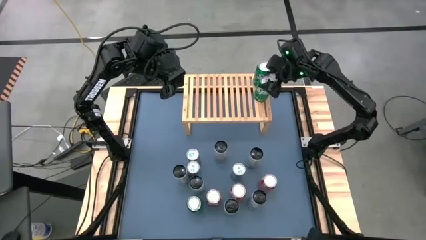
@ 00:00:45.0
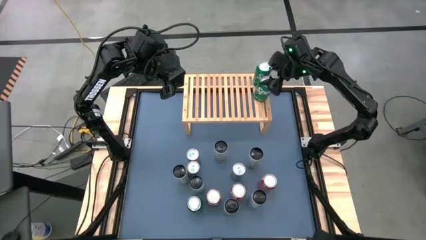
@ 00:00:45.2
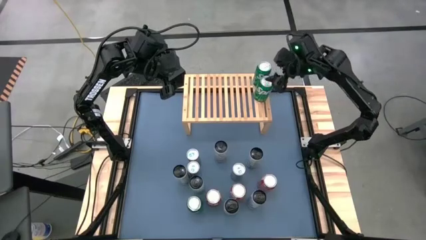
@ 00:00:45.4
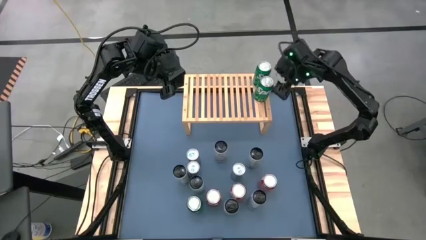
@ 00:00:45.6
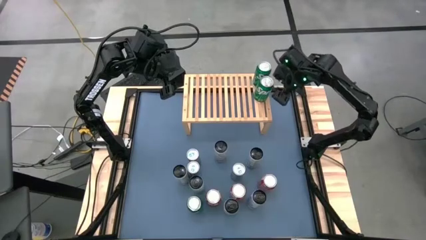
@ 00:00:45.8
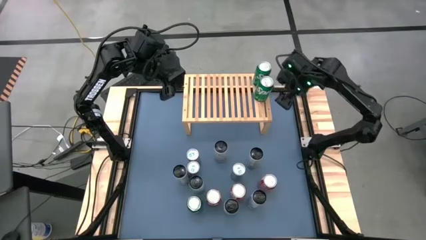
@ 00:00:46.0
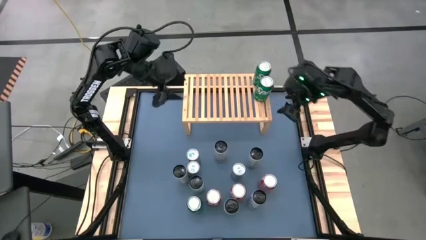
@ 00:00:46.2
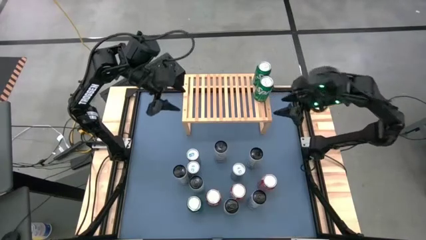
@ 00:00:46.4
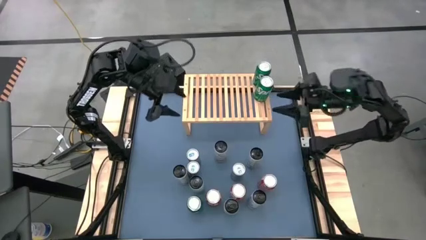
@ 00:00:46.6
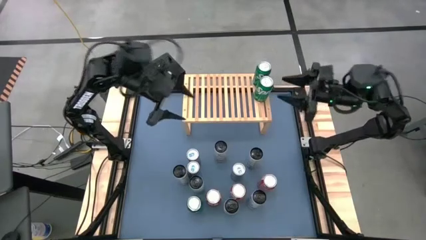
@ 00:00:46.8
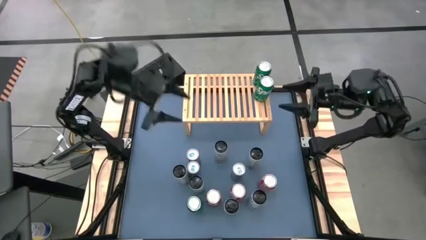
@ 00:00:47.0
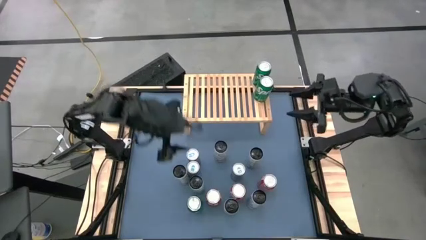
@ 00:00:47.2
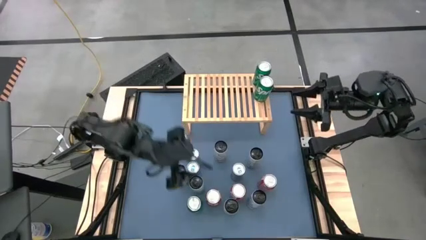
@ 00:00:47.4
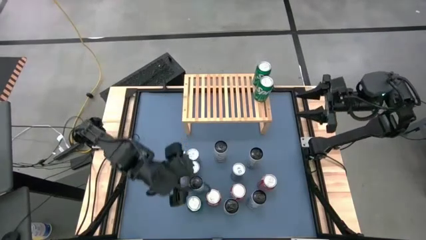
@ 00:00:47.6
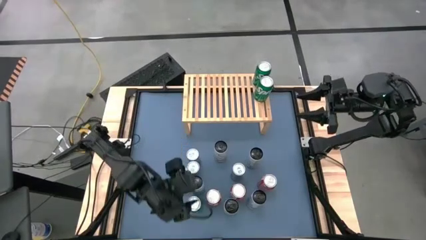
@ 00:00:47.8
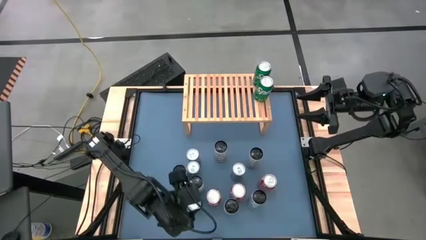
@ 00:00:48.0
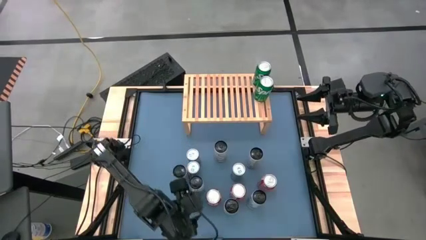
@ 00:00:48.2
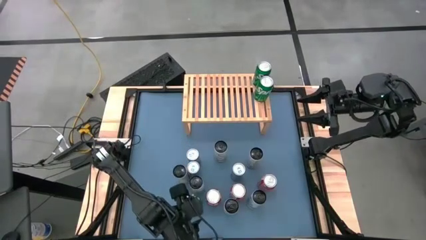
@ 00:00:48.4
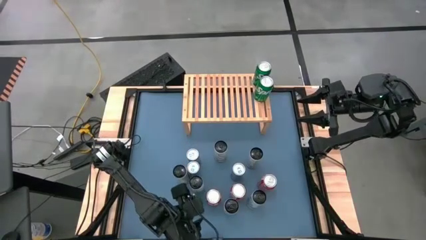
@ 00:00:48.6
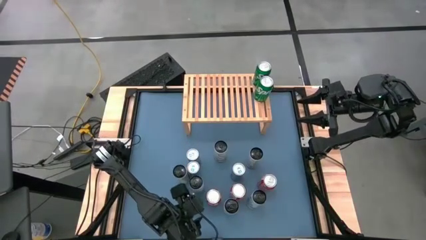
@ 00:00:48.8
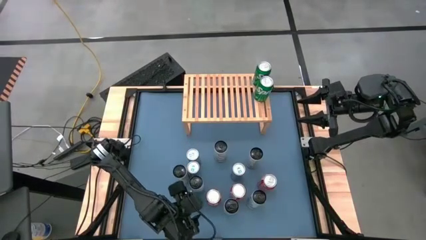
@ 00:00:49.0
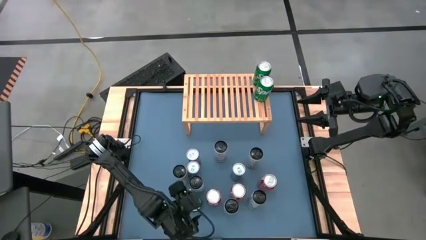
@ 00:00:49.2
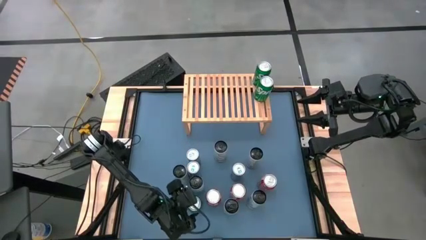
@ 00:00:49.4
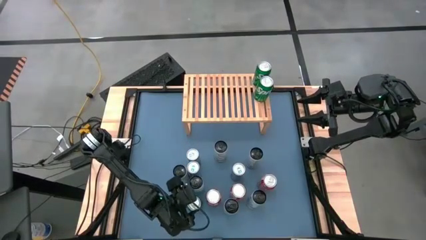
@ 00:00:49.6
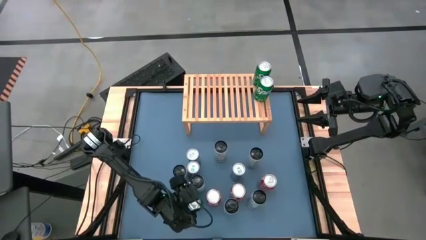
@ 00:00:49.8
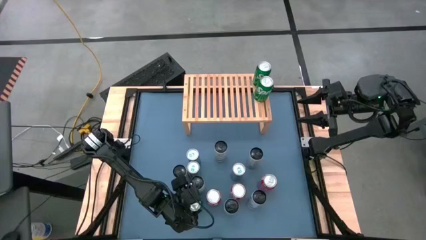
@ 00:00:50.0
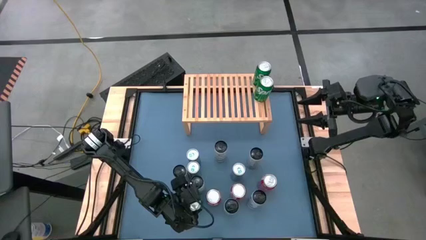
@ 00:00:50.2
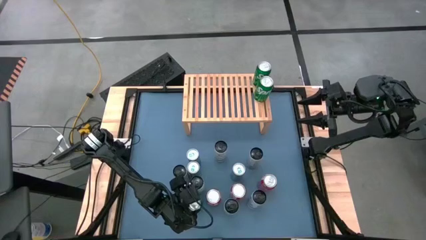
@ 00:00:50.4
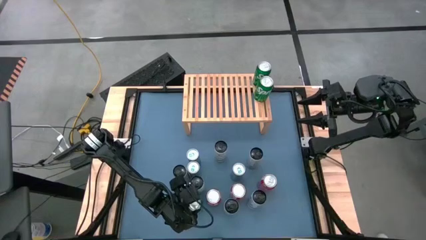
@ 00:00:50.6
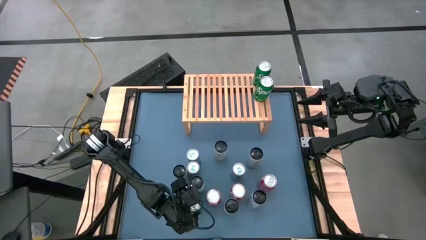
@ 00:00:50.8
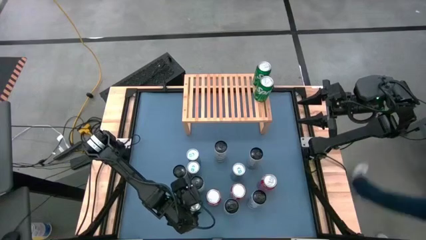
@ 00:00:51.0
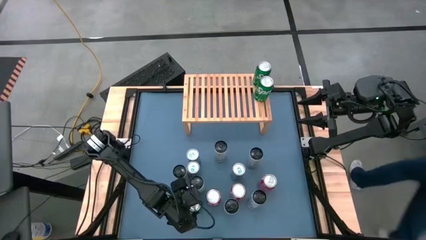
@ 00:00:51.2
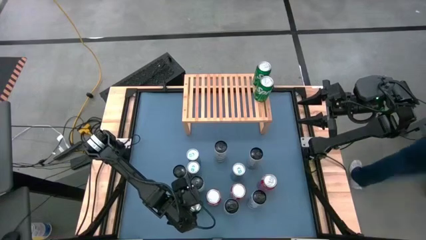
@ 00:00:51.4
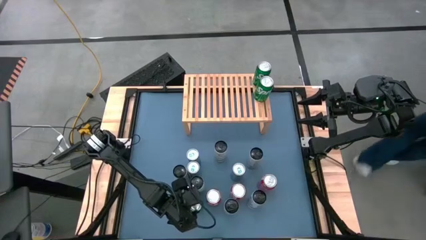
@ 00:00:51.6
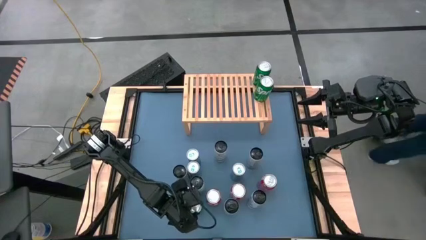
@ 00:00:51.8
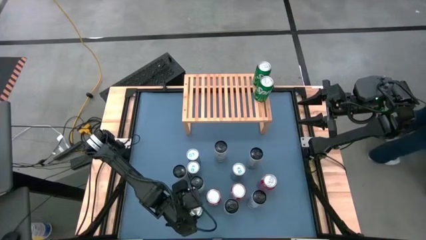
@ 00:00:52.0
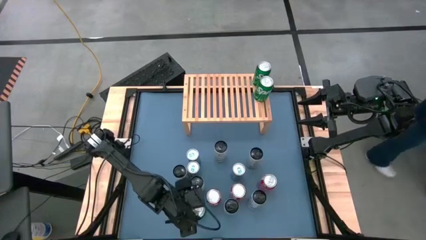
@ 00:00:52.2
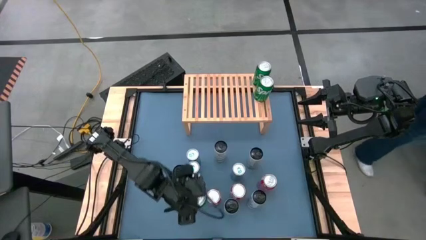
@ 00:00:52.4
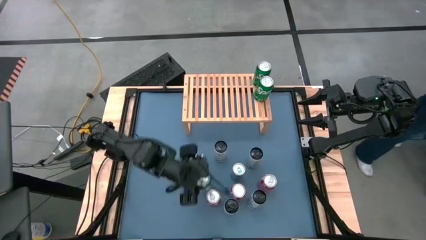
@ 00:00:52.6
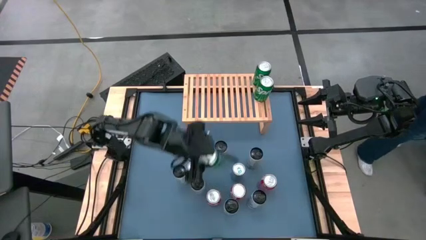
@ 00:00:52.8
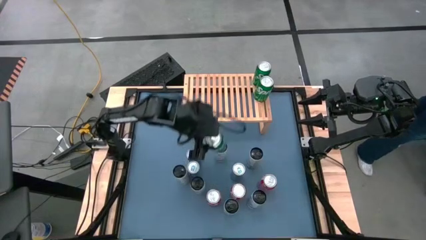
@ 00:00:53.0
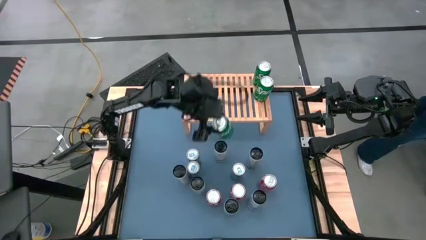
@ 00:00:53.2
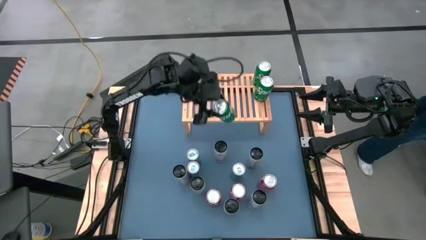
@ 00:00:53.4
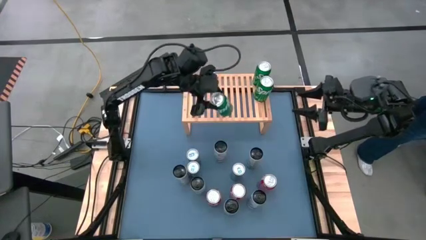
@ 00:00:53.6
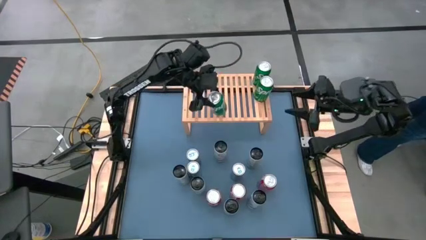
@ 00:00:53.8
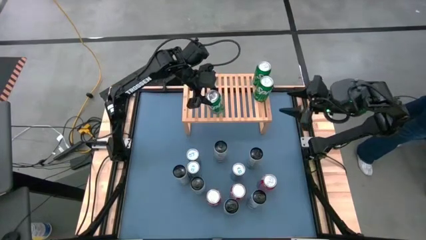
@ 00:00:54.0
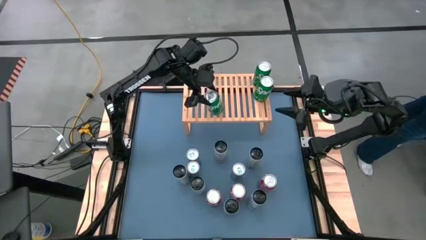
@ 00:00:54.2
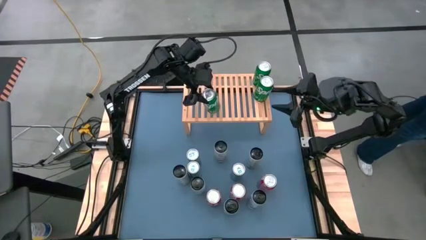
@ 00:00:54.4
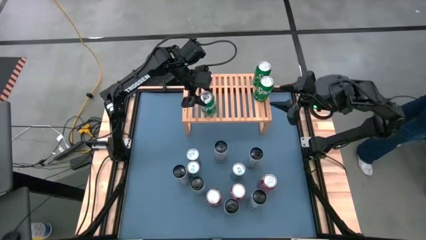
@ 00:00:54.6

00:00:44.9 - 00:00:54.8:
Task: Place canned beverage on shelf
Put the green soda can on the shelf aligned with the other green soda can
